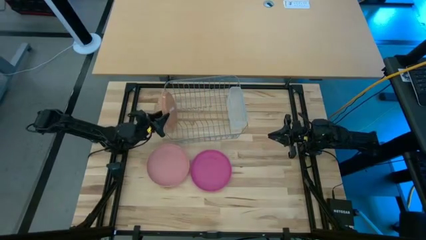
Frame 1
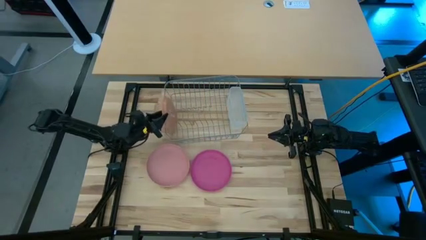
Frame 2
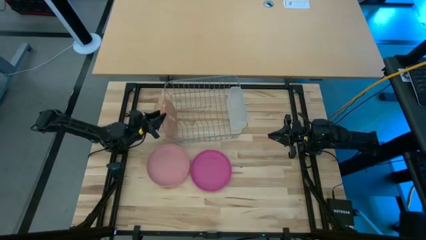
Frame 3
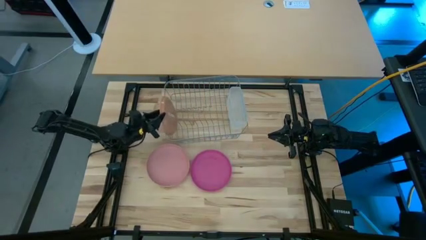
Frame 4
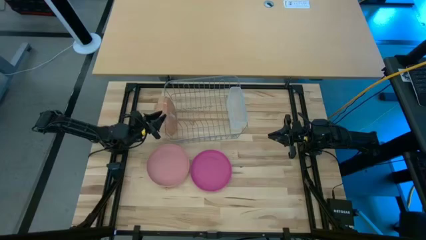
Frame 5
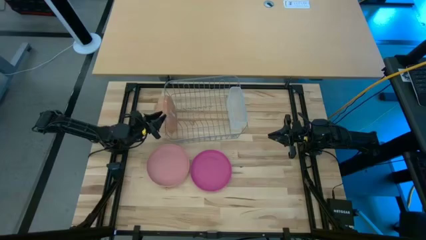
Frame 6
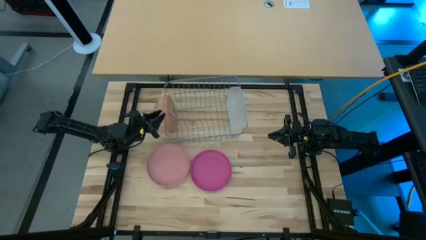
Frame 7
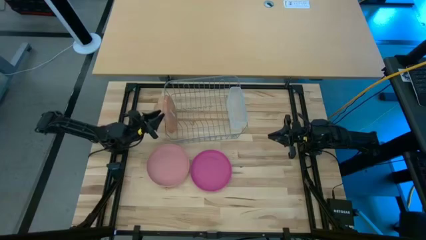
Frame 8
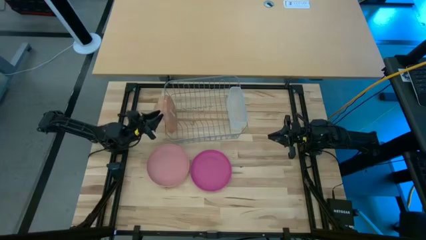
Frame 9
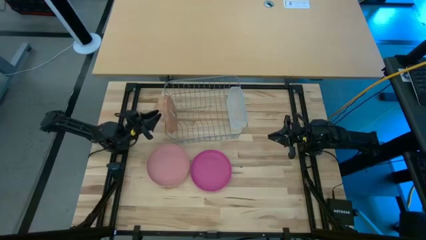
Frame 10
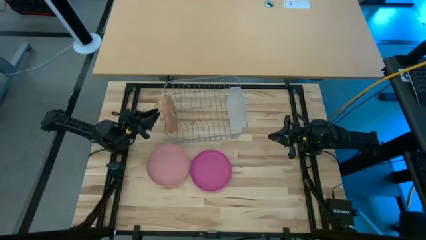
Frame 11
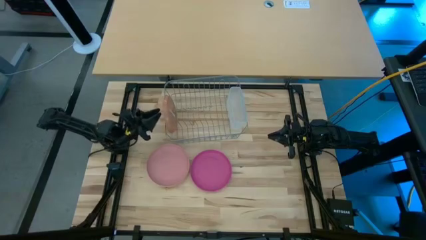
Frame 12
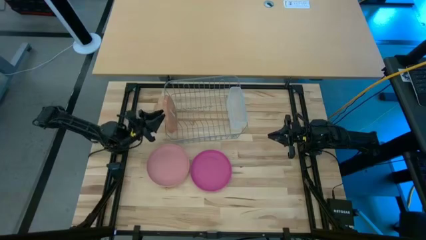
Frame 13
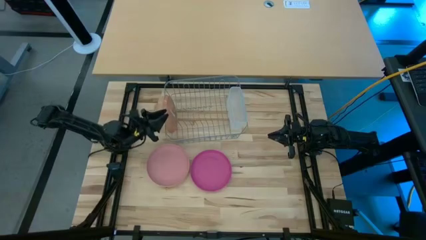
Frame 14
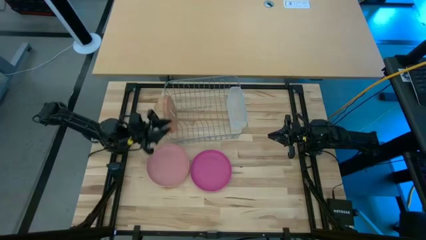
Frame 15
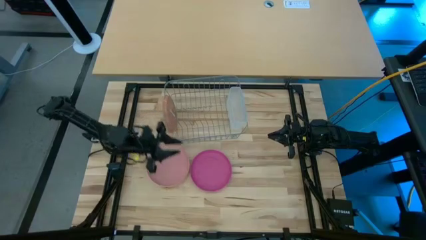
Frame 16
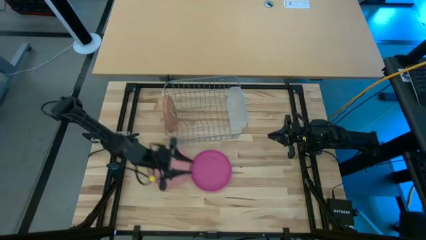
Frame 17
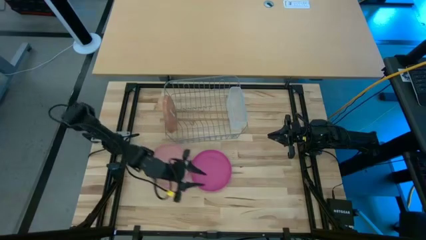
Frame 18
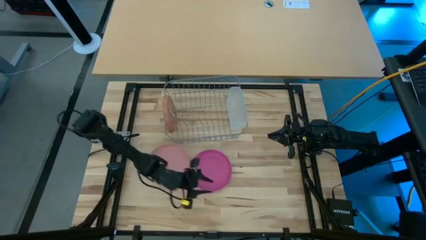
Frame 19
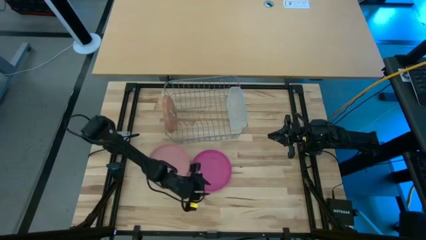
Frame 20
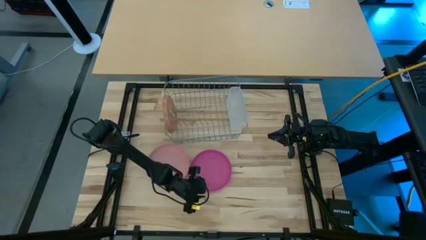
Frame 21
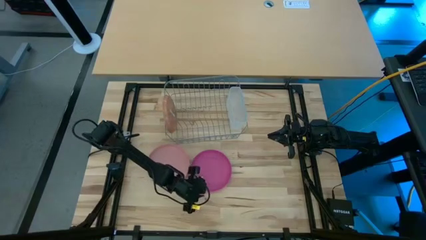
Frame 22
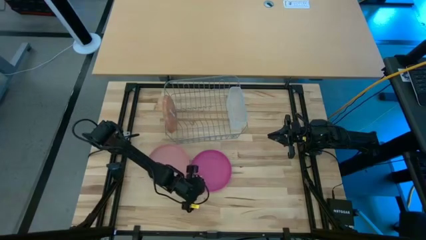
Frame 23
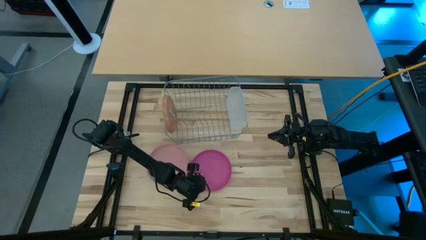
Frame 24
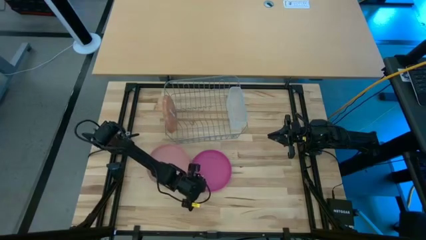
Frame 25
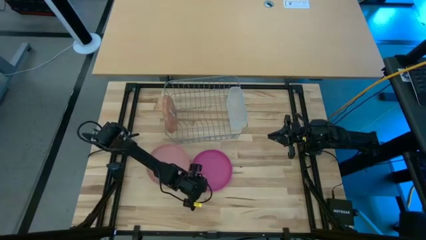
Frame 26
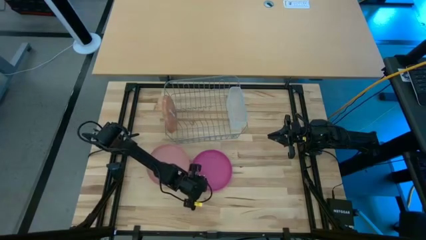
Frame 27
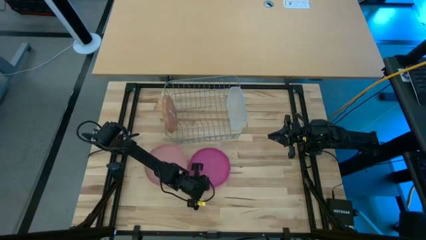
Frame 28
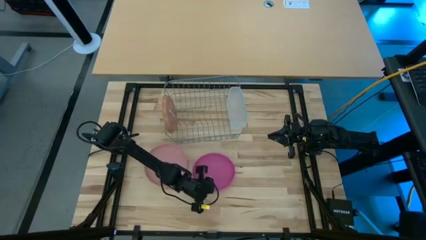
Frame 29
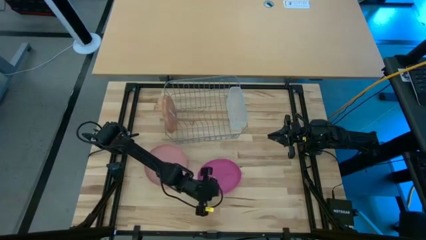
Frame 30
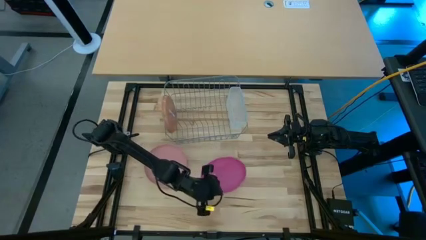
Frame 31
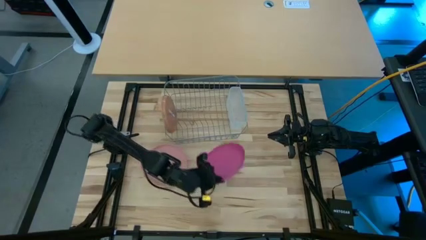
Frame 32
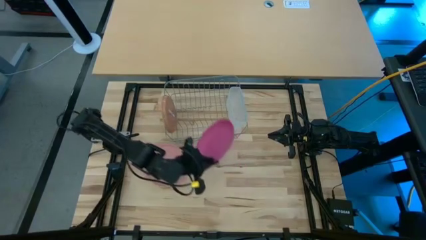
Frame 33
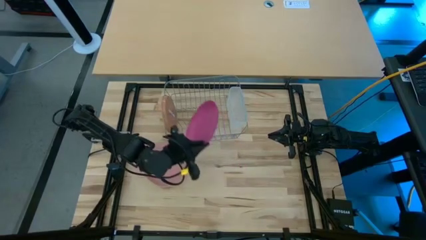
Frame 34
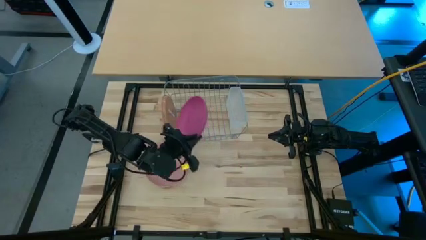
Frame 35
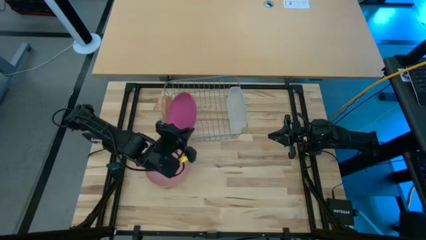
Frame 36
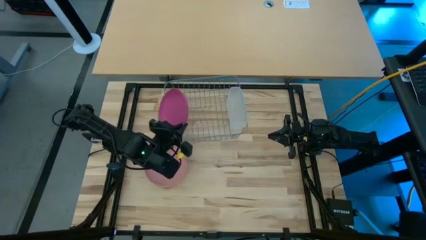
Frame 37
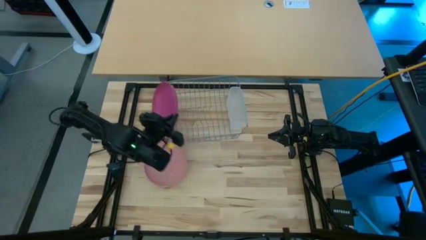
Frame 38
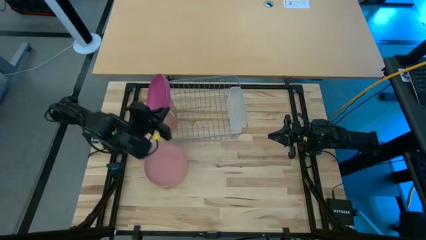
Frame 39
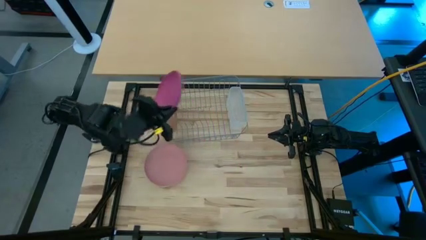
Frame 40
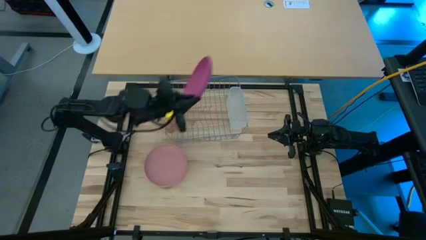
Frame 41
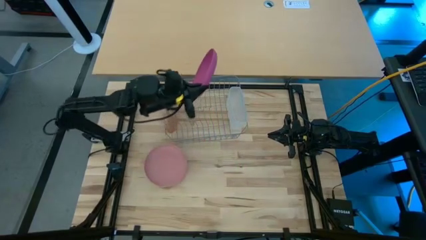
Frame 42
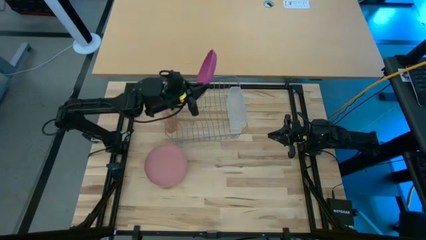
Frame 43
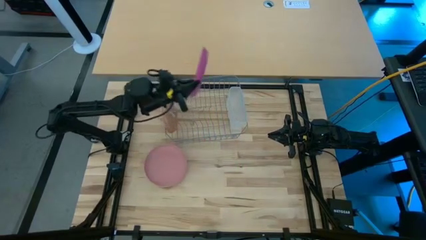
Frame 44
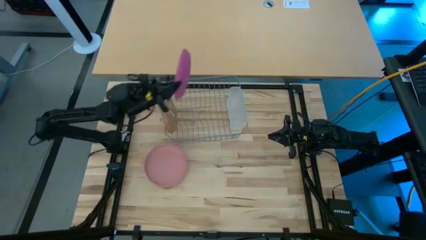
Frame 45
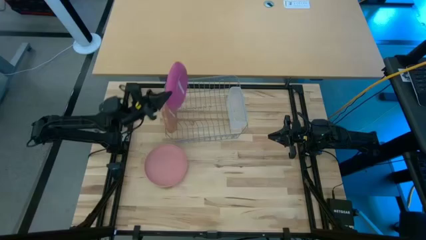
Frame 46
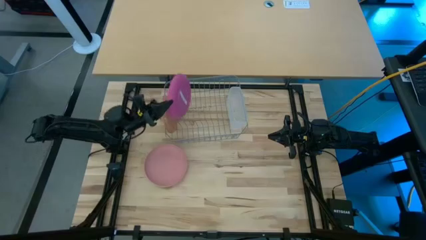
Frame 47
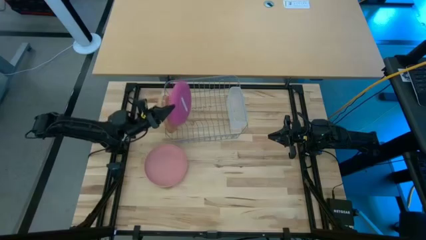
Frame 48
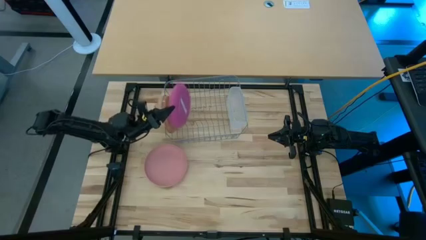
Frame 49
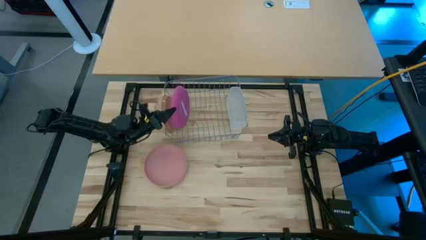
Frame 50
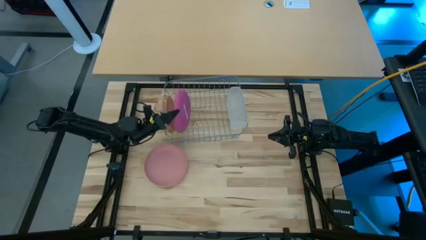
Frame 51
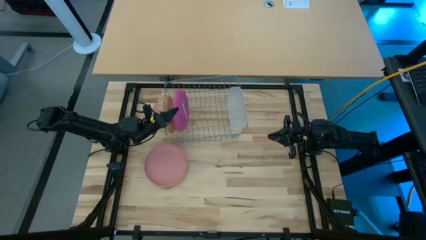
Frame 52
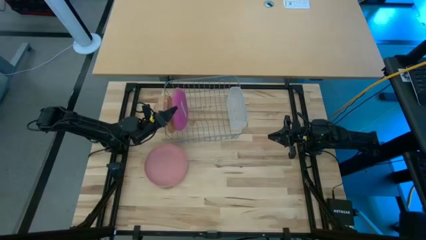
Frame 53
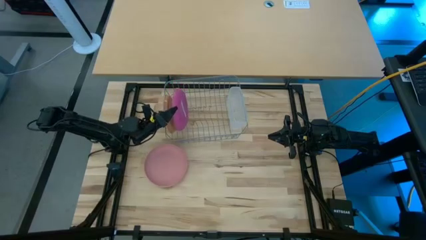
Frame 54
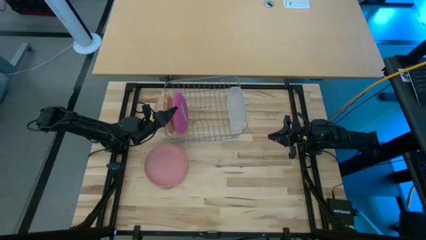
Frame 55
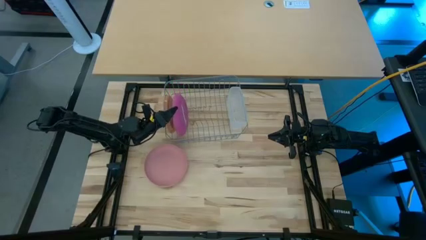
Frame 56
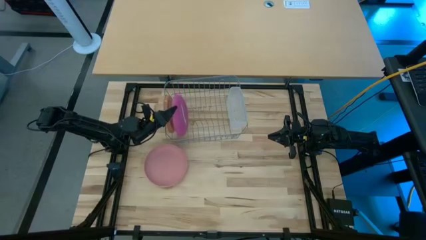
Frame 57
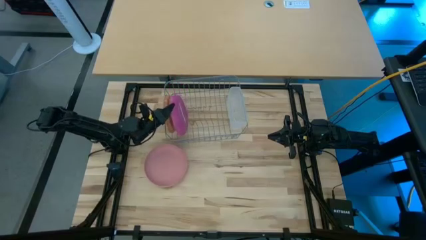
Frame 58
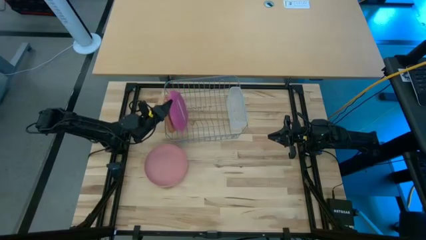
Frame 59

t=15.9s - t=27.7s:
Task: Sort dishes
Put the dark pink plate into the dish rack
